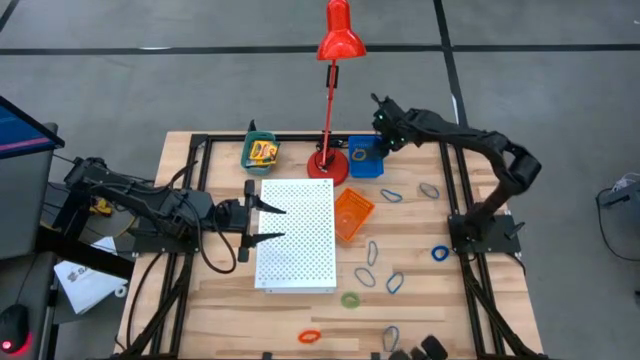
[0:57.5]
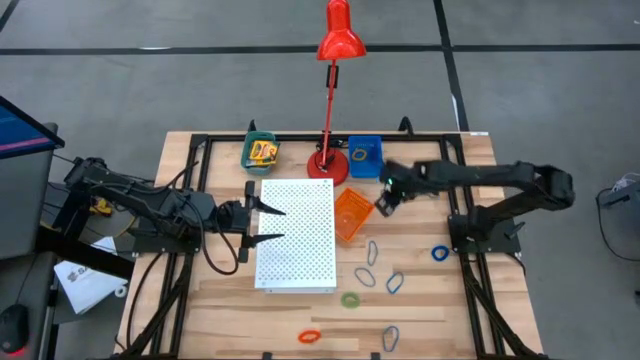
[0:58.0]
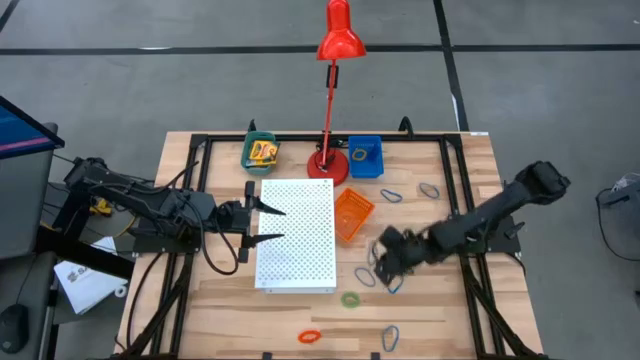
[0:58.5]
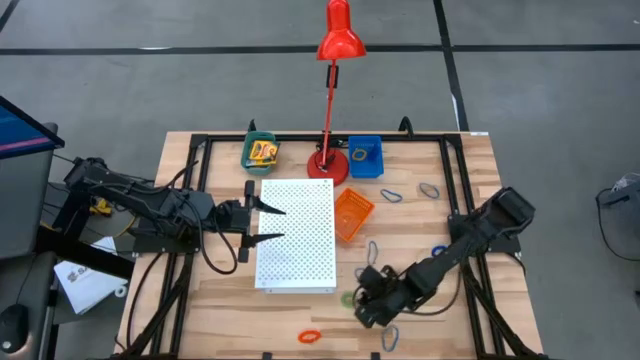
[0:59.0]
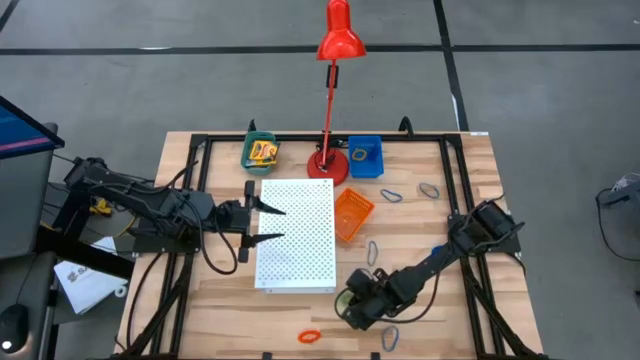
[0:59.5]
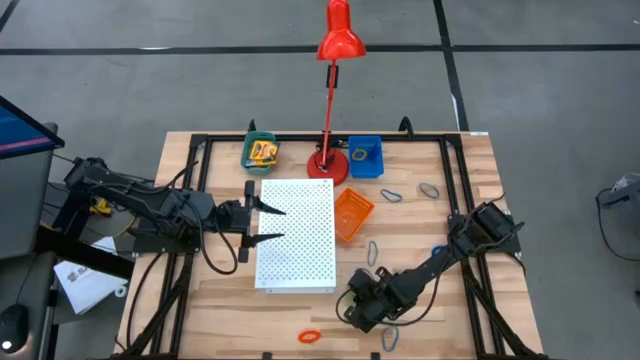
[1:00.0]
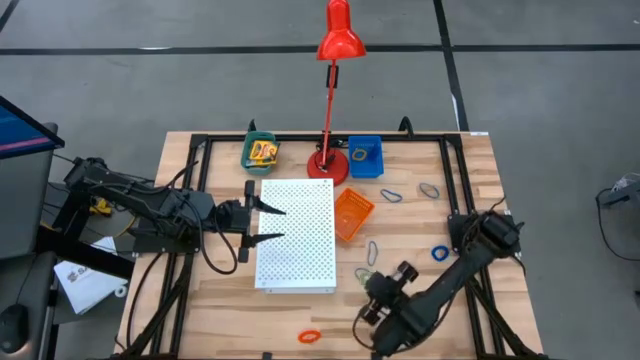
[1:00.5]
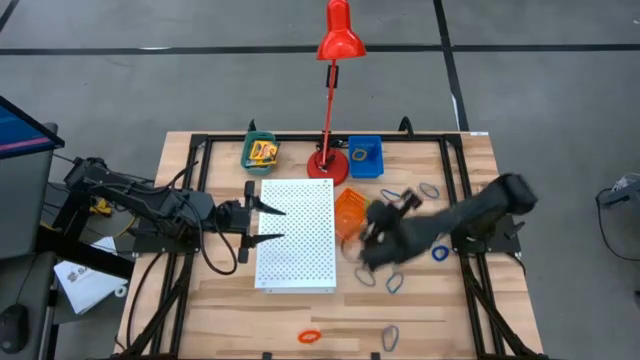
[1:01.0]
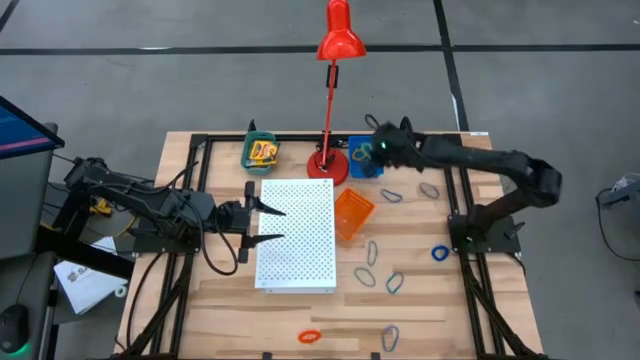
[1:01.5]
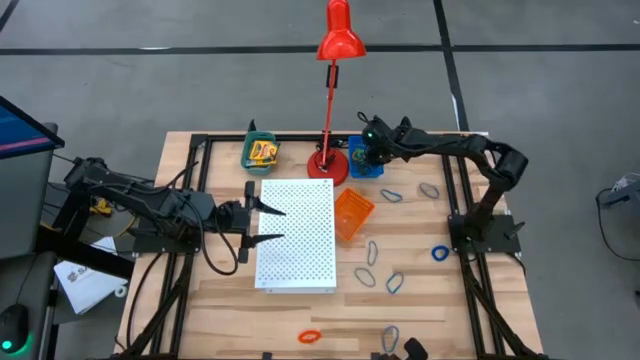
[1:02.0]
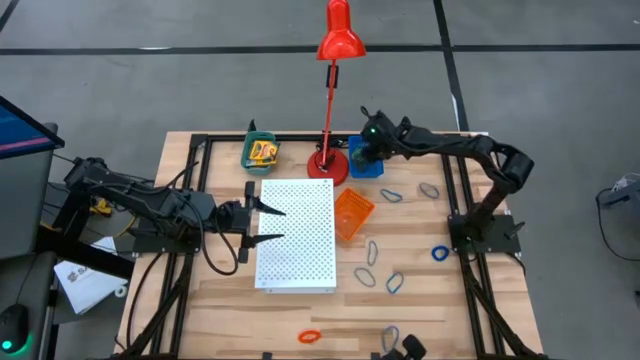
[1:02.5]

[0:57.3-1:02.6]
Task: Pick & Place Office Desk Supplies
Put the green spring keychain into the blue bin

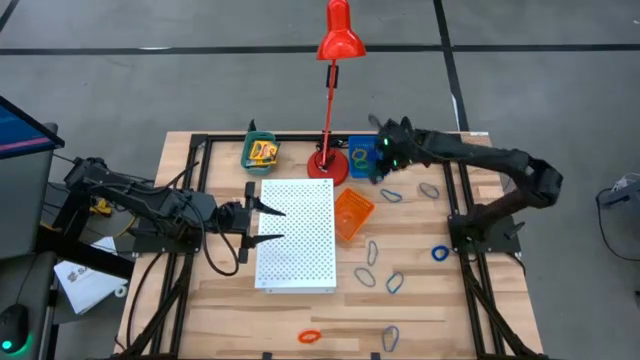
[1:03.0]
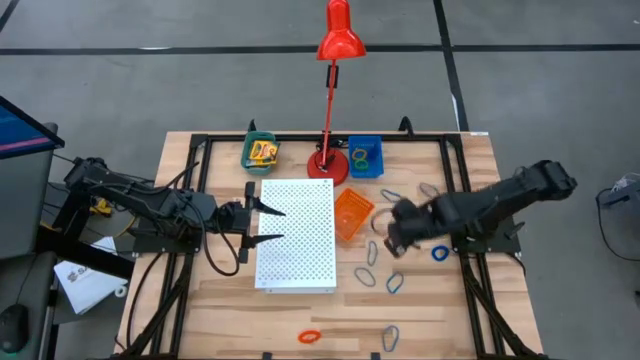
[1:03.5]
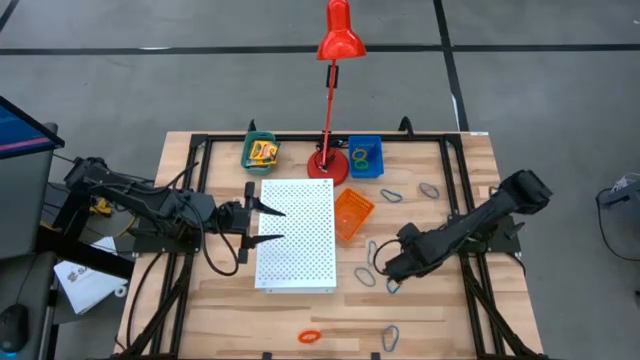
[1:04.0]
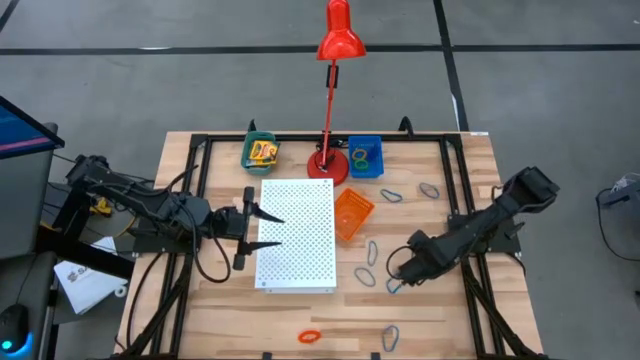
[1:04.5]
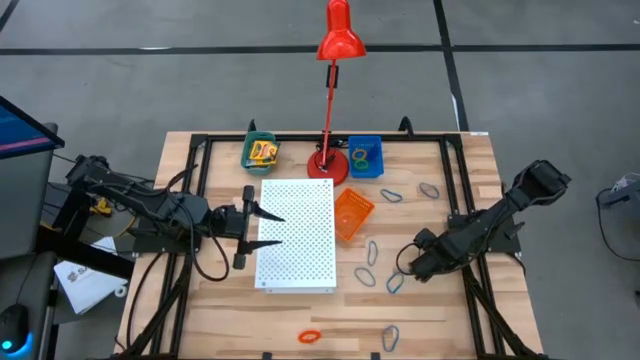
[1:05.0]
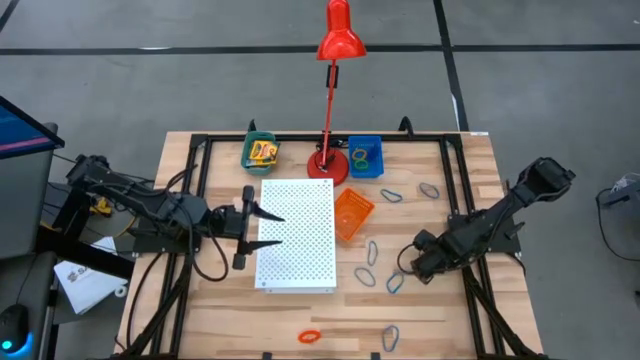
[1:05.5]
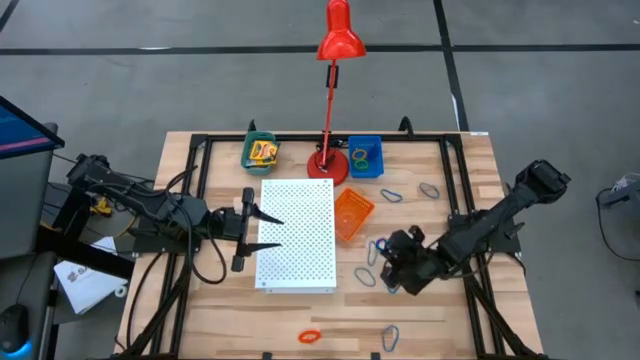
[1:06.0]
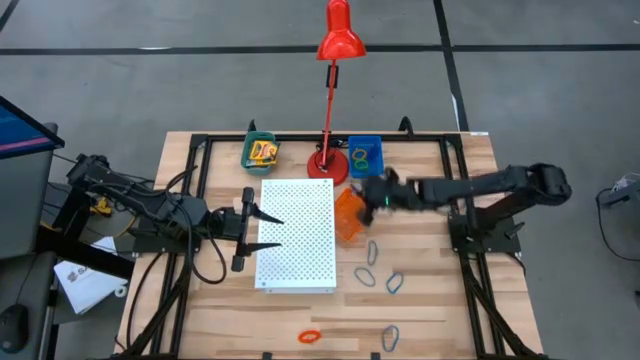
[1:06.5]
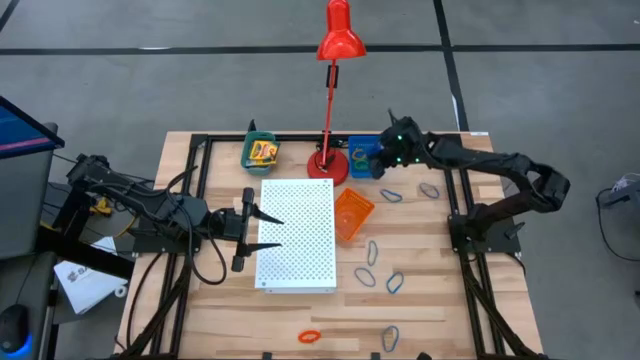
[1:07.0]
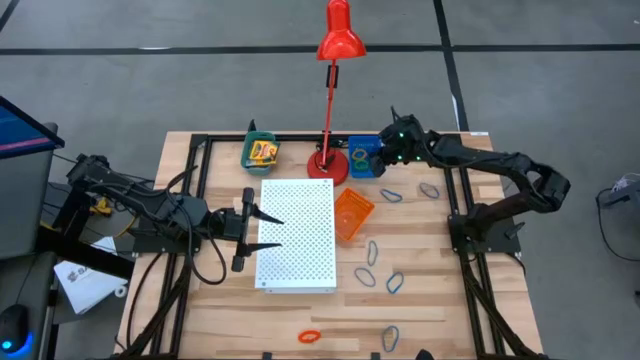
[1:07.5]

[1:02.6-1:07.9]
Put the blue spring keychain into the blue bin

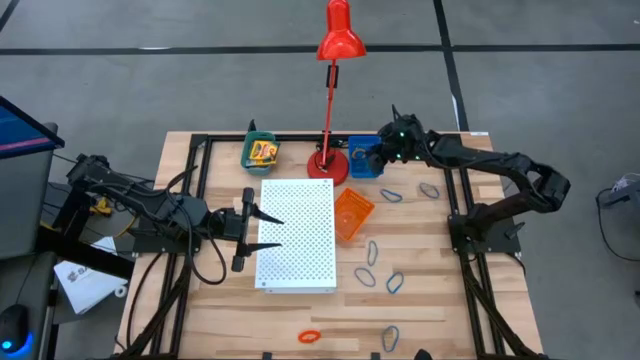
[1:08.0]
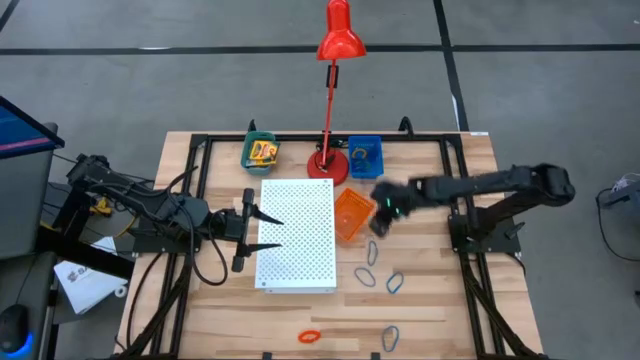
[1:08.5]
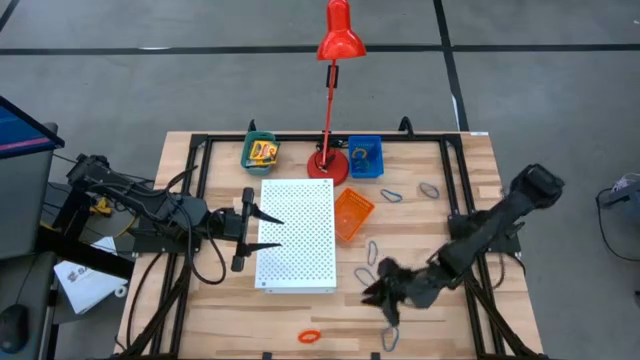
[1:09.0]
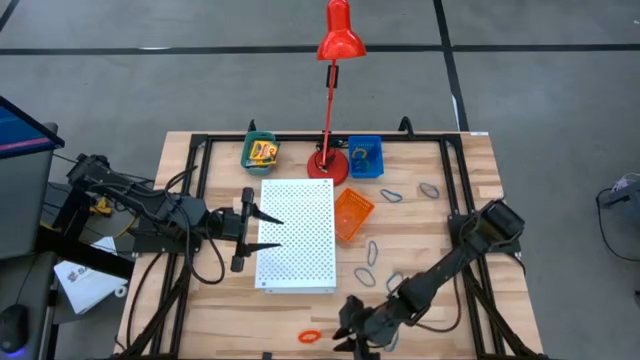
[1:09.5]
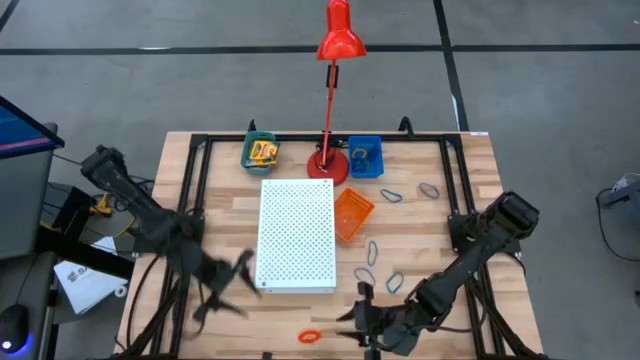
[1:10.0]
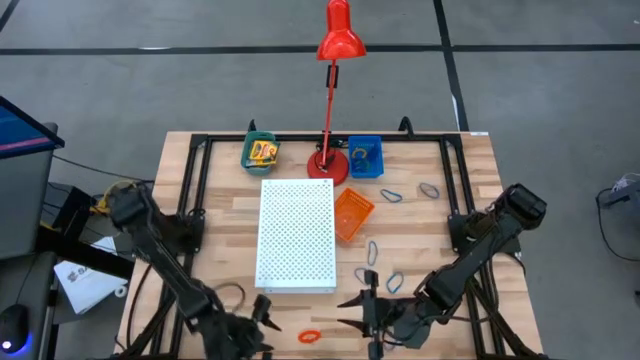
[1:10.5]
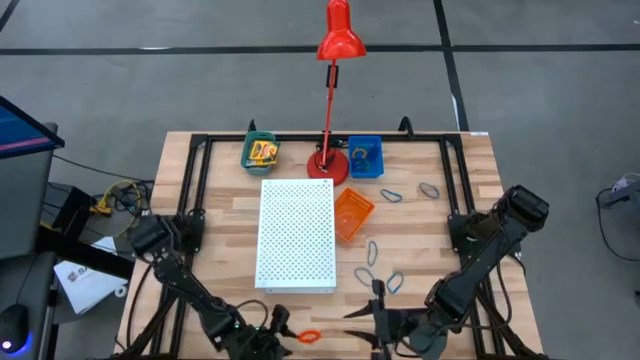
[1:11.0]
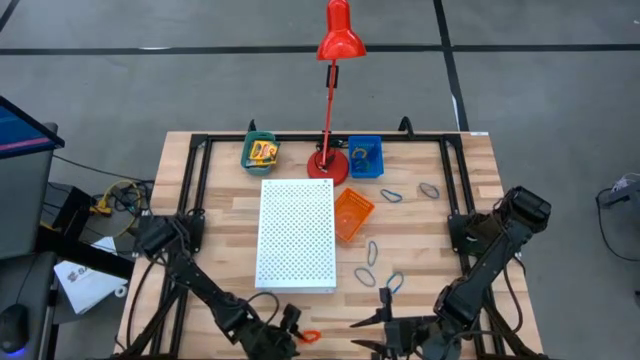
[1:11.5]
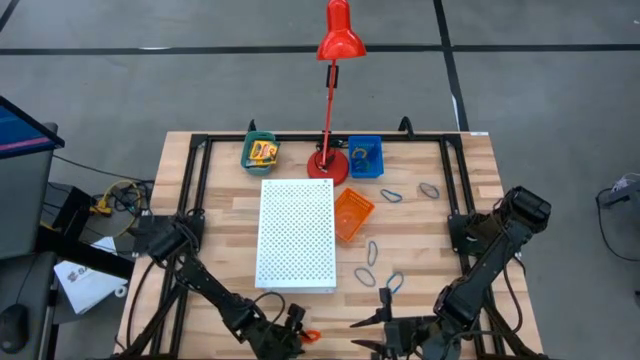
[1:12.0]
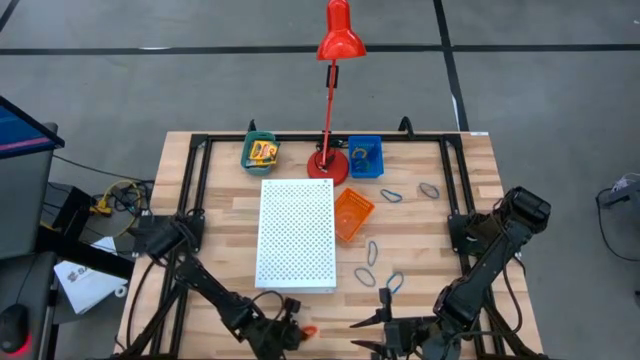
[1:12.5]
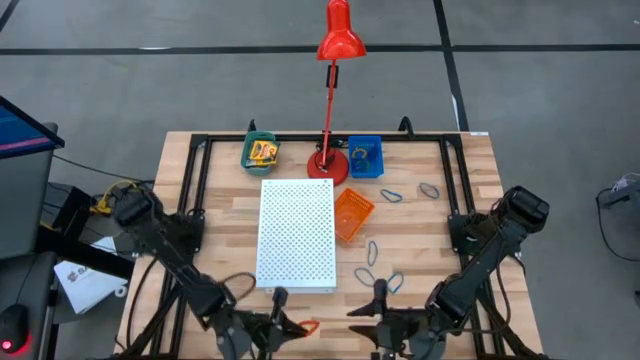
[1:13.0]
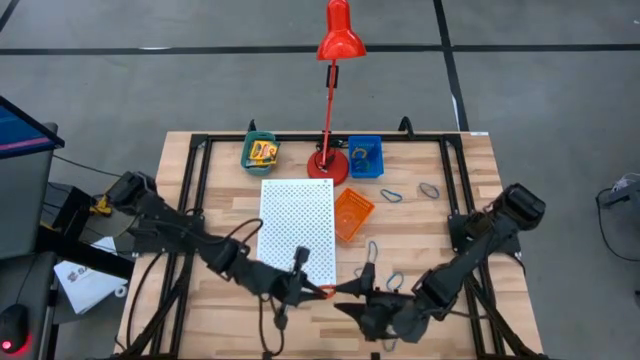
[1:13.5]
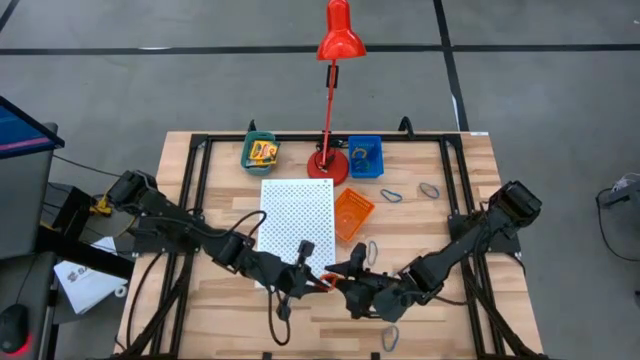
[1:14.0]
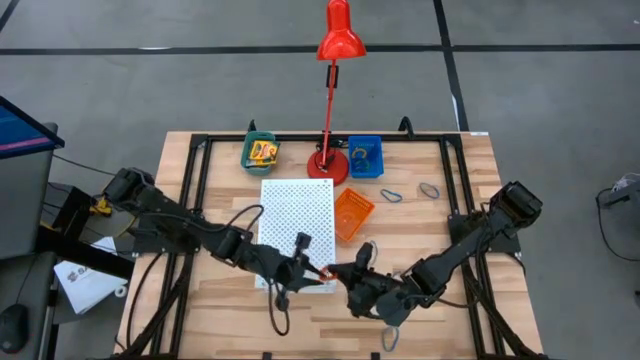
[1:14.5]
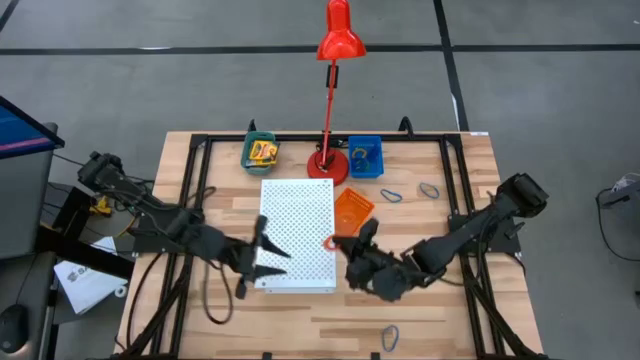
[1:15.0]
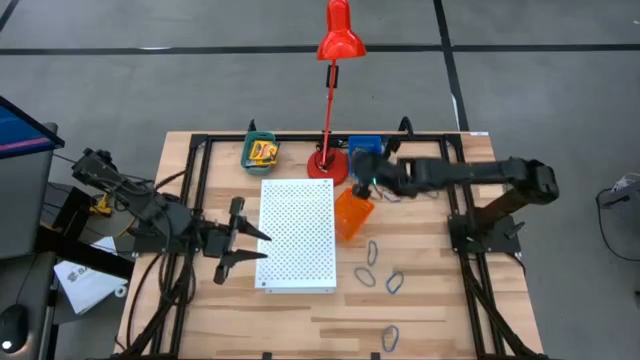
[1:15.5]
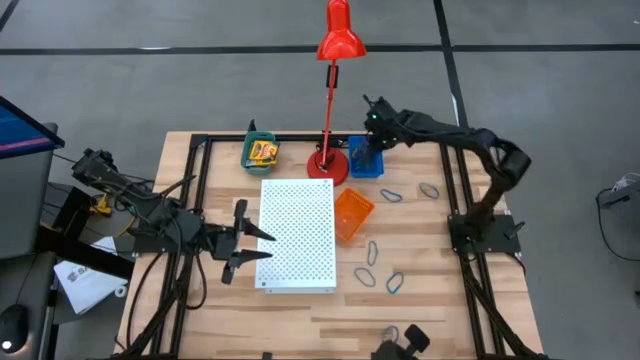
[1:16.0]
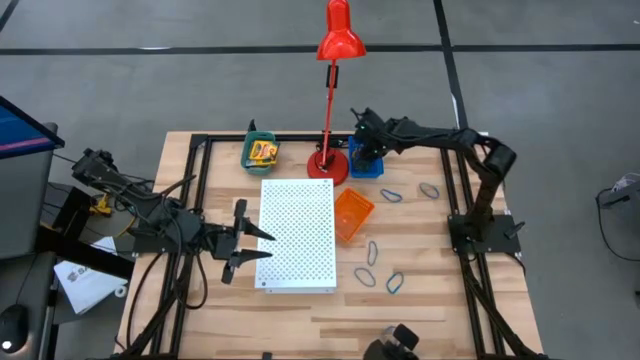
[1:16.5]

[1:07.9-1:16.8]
Put the orange spring keychain into the blue bin

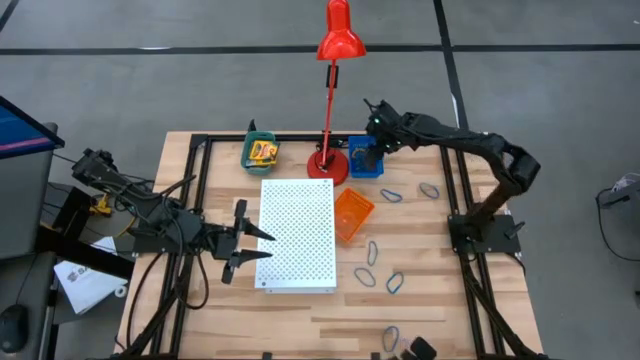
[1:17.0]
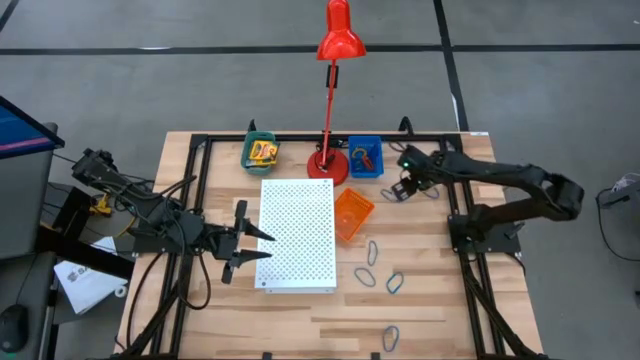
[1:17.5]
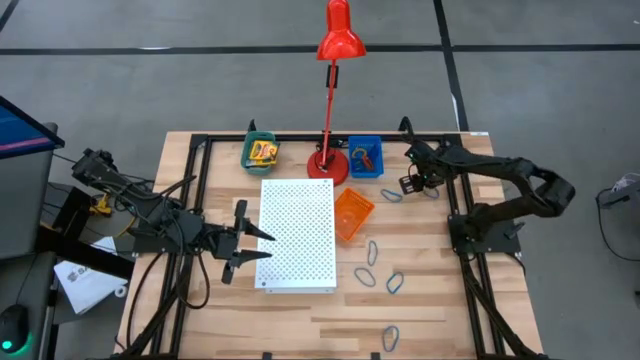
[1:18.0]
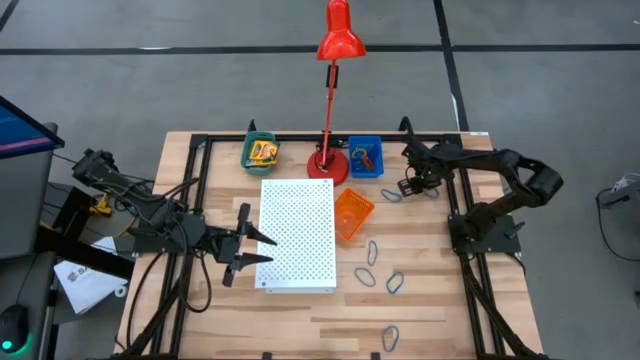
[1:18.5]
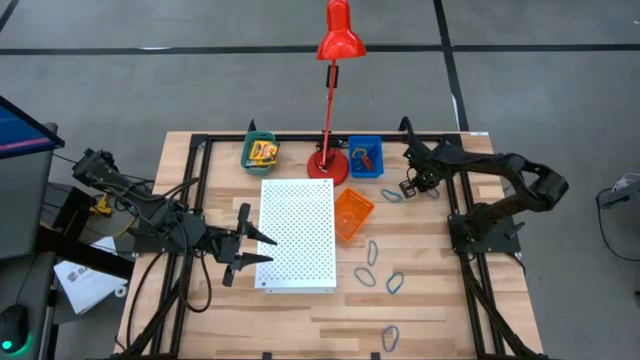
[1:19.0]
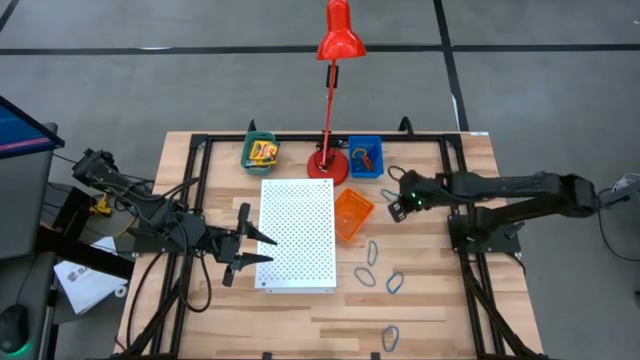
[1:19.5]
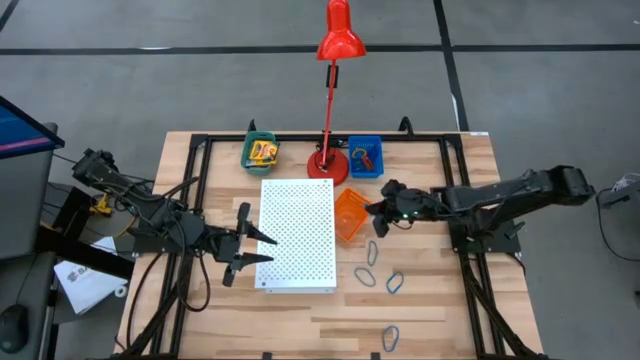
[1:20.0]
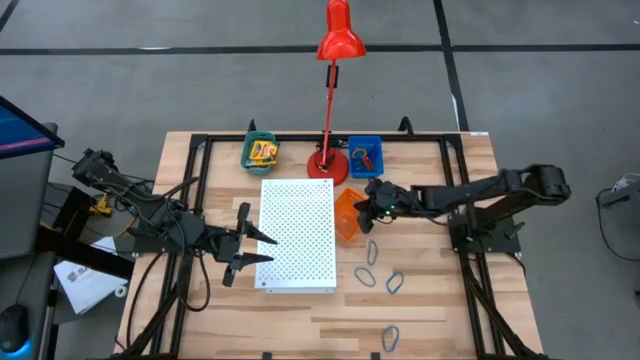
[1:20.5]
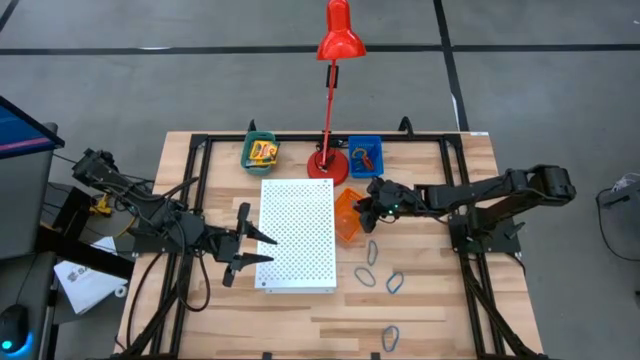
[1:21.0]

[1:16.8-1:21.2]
Put the blue rubber band into the orange bin
